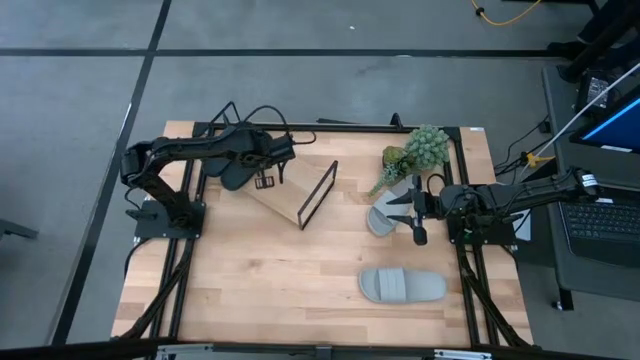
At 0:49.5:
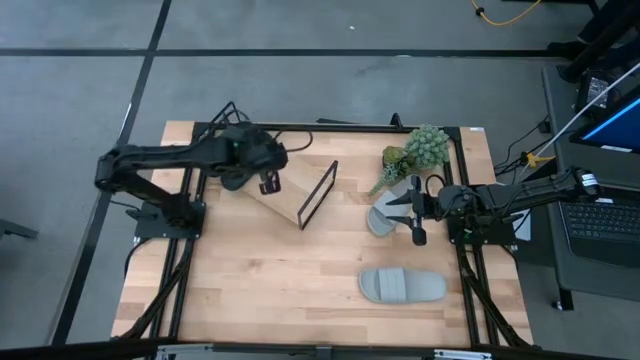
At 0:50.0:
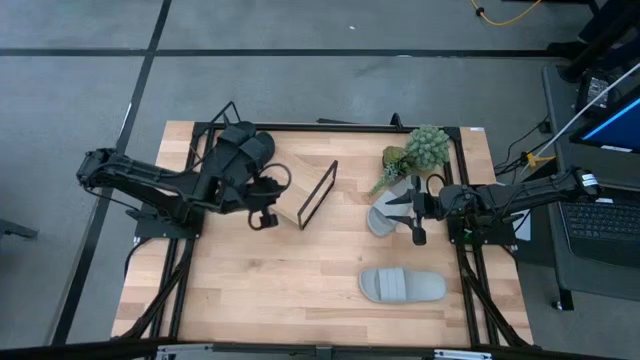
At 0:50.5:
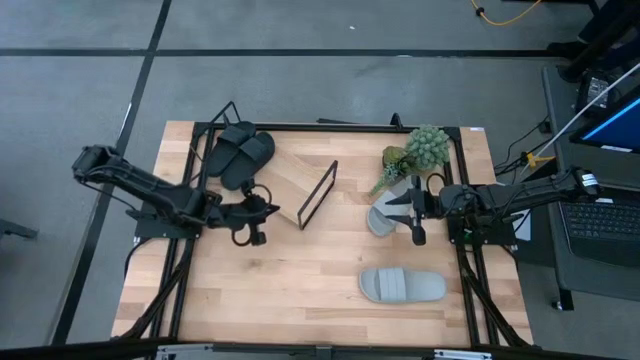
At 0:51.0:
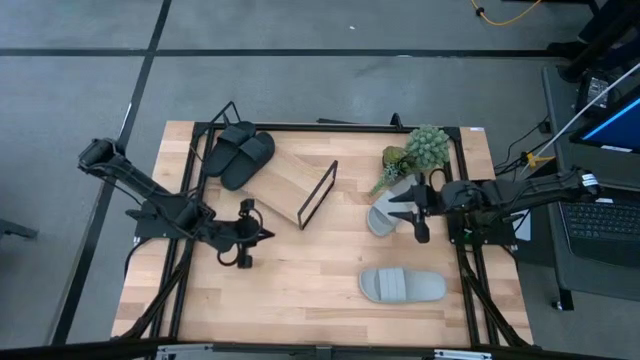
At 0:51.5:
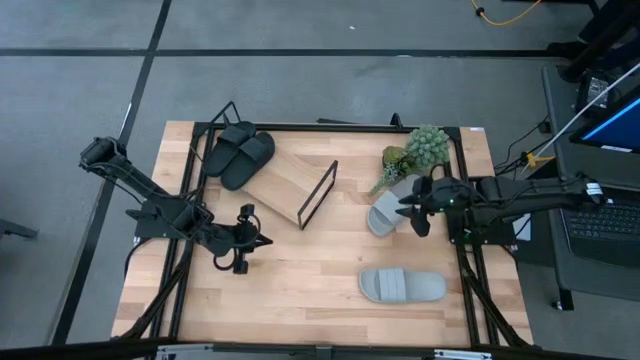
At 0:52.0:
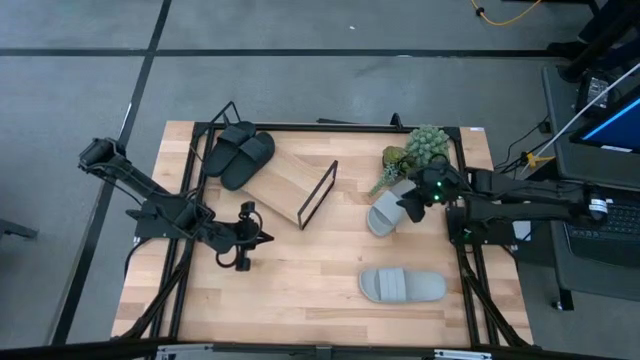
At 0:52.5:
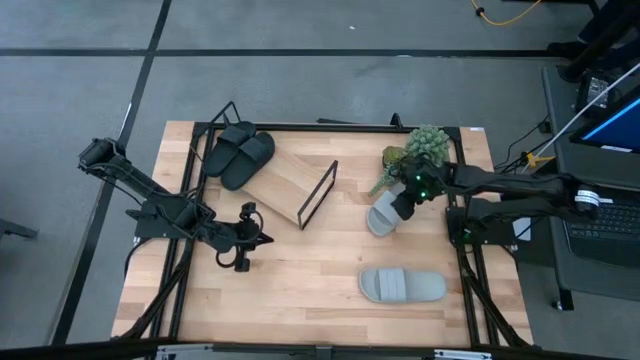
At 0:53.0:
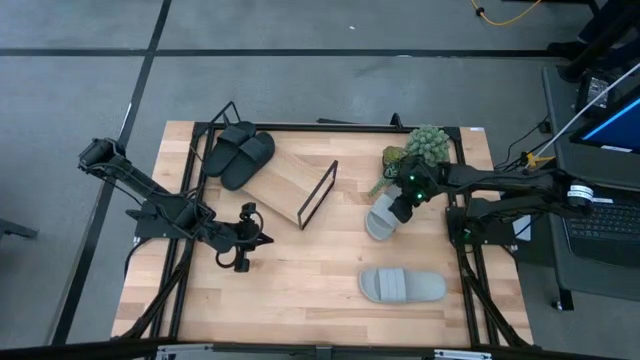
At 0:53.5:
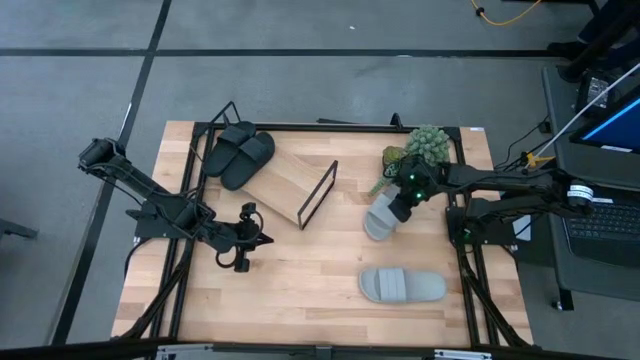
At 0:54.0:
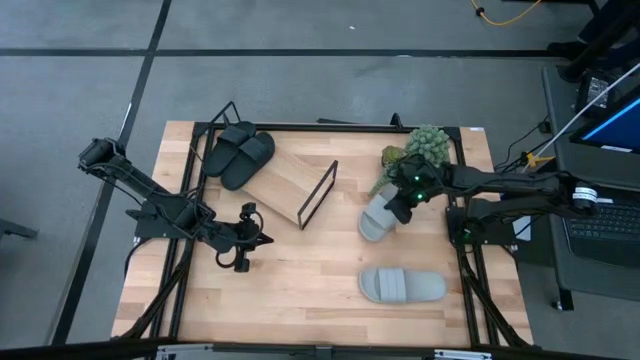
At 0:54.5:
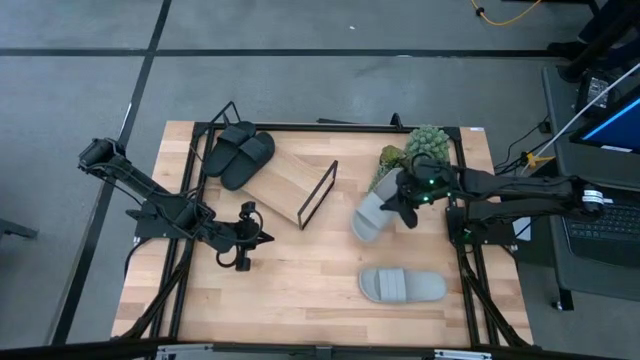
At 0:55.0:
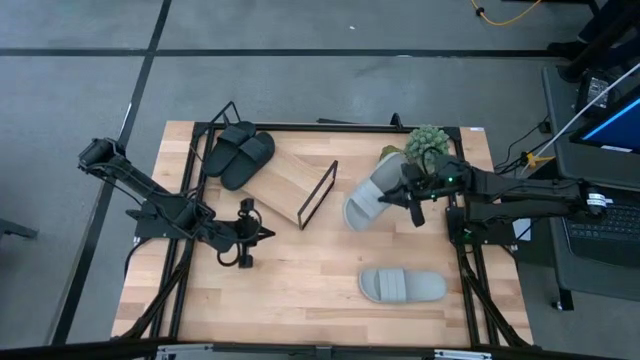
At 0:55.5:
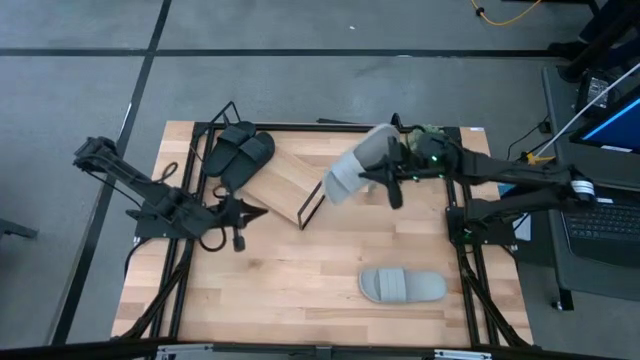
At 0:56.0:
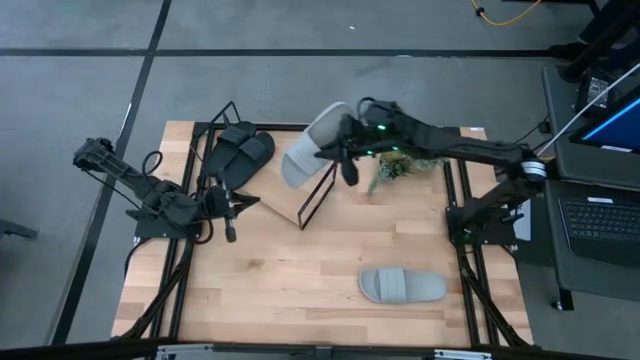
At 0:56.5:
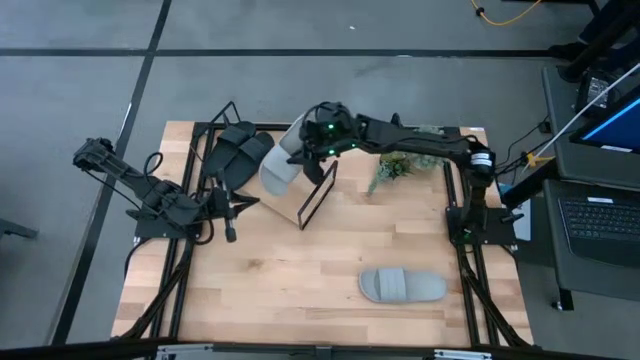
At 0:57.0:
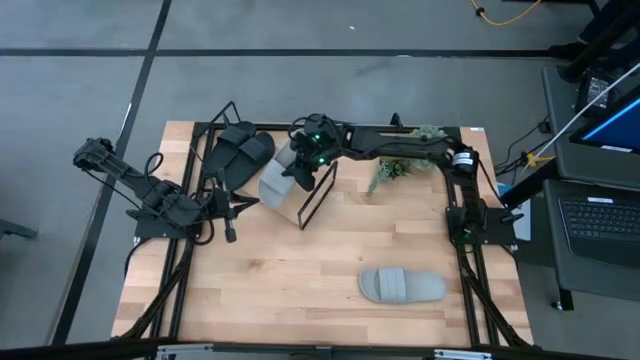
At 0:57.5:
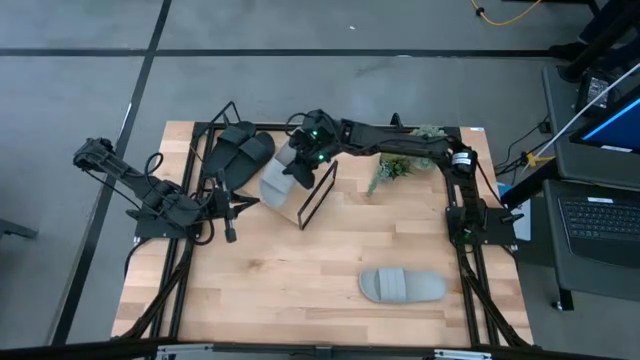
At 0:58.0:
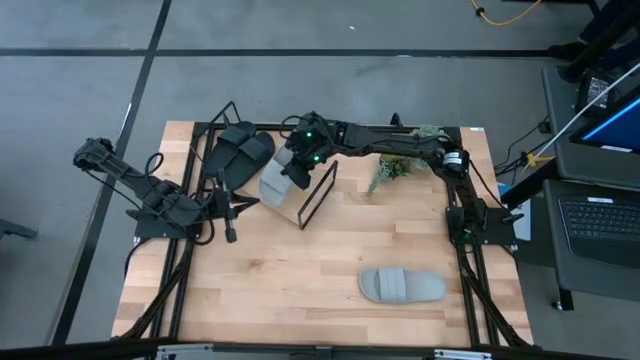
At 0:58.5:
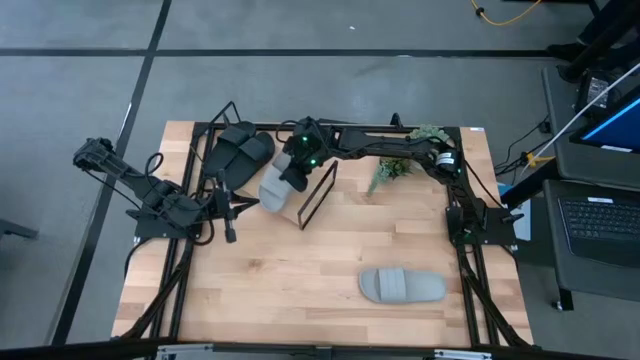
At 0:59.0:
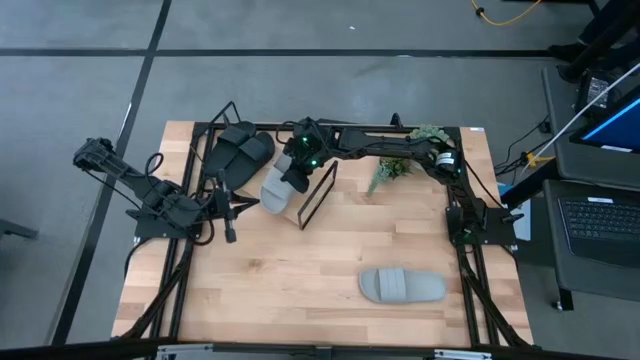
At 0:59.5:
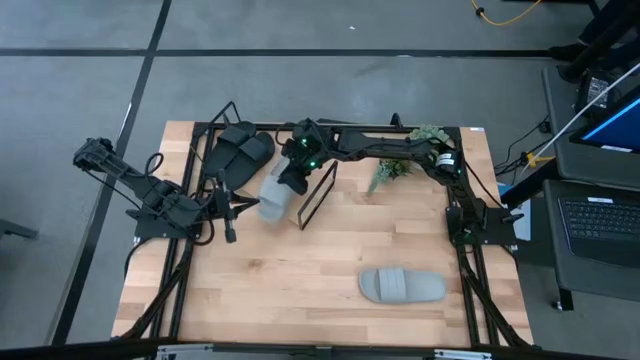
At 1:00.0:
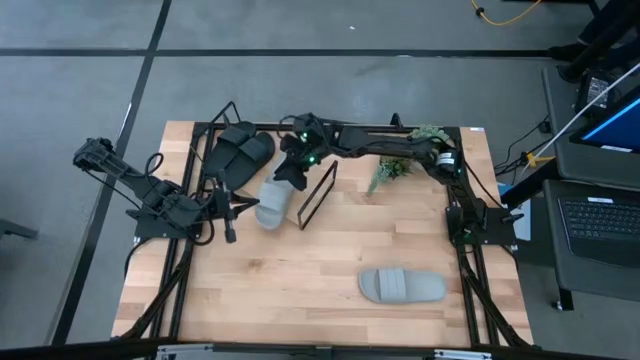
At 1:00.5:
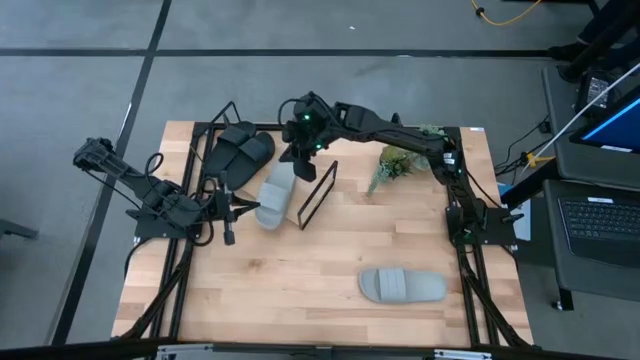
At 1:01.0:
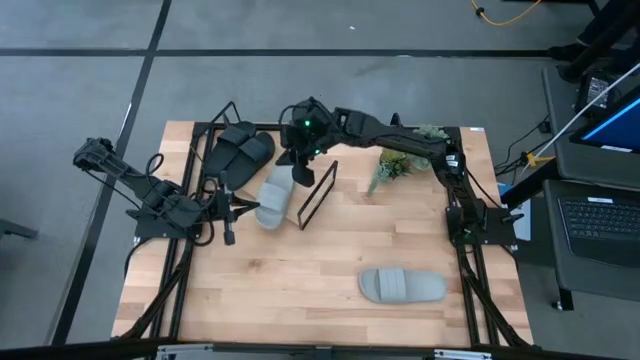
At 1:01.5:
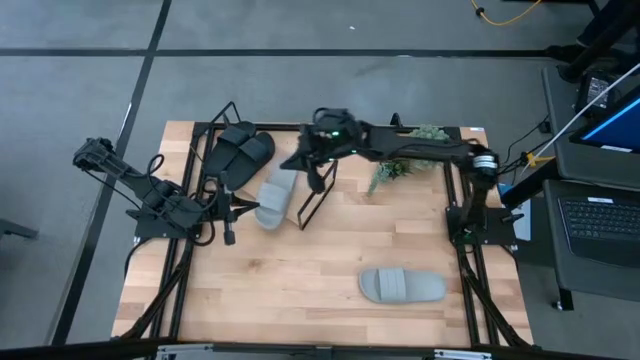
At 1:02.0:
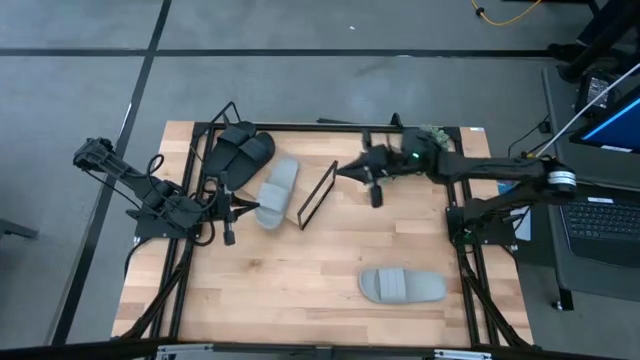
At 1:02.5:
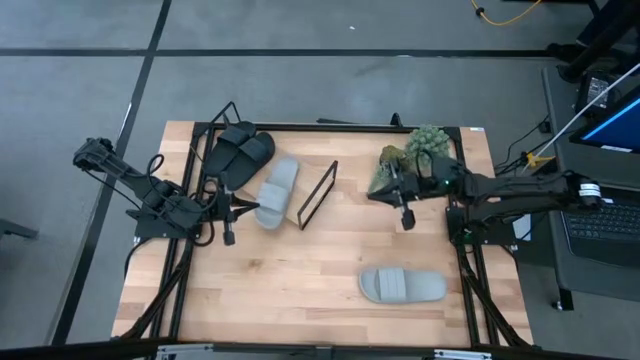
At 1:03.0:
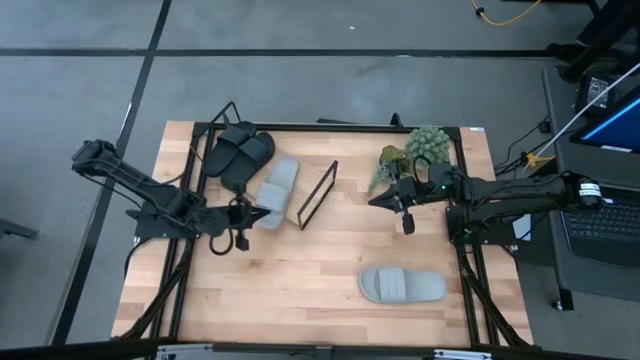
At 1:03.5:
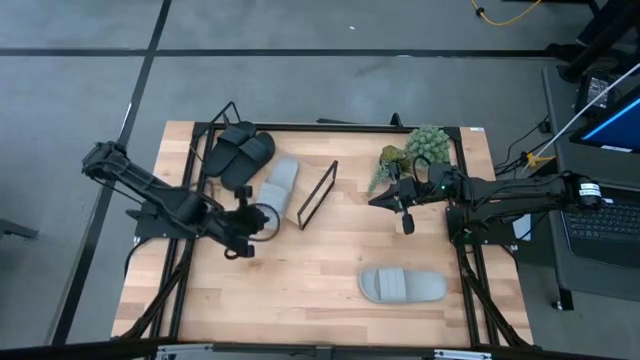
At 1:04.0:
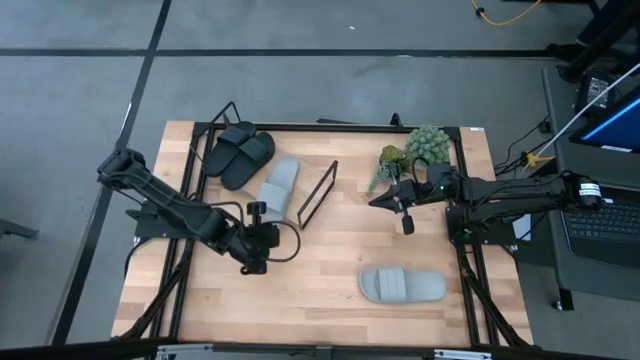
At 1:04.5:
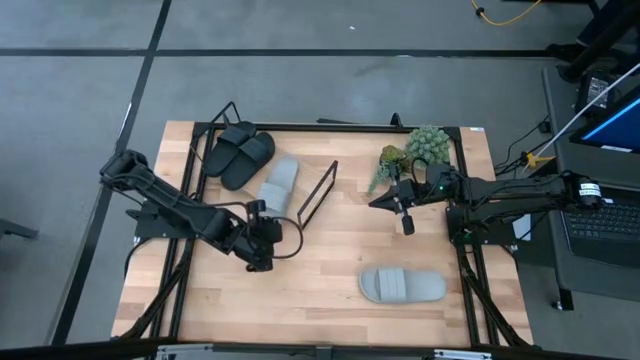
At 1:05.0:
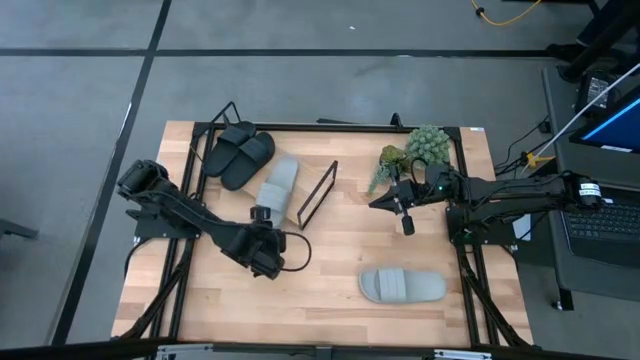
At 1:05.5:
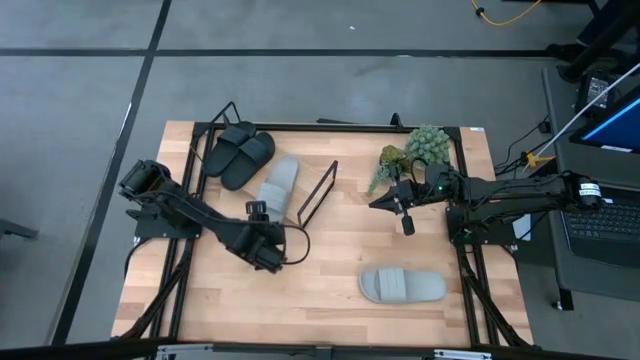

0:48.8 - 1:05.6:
Task: Pick and place slides into the shelf
Put the top gray slipper on the shelf

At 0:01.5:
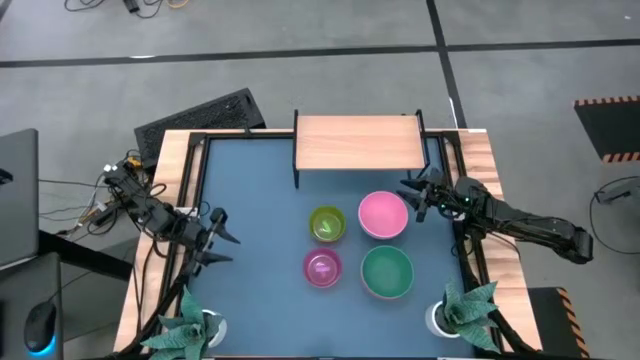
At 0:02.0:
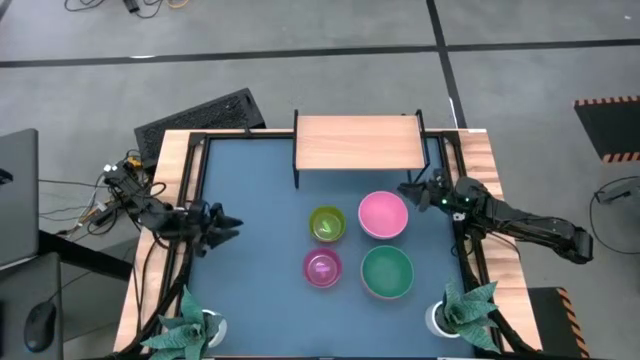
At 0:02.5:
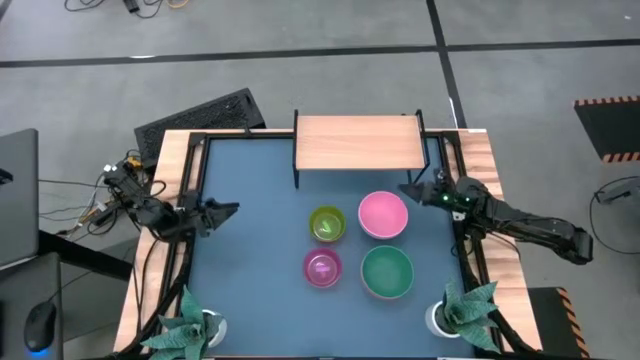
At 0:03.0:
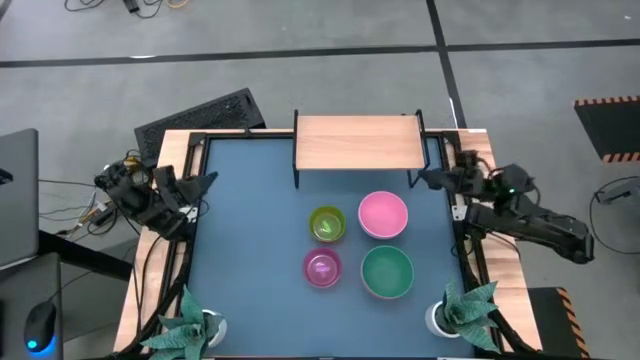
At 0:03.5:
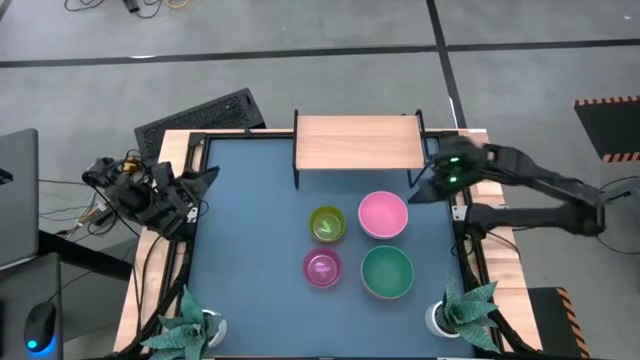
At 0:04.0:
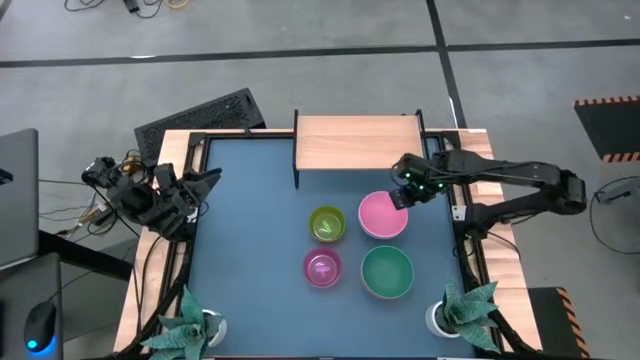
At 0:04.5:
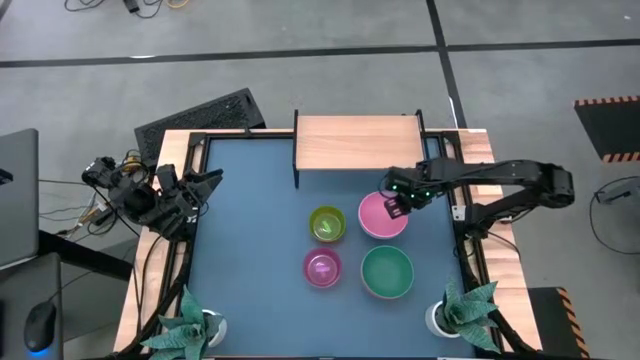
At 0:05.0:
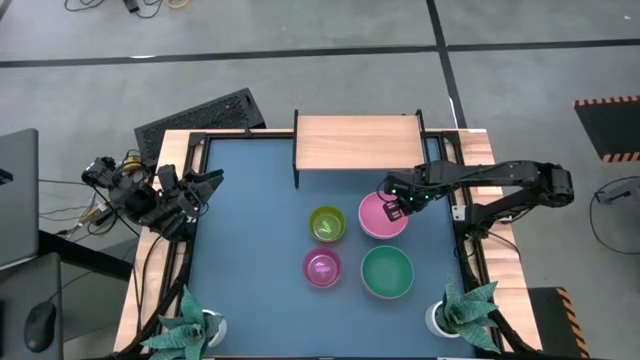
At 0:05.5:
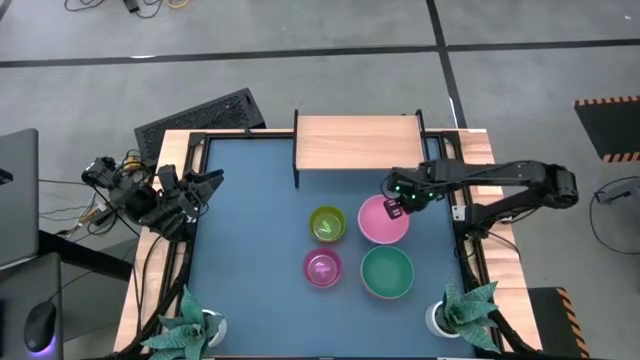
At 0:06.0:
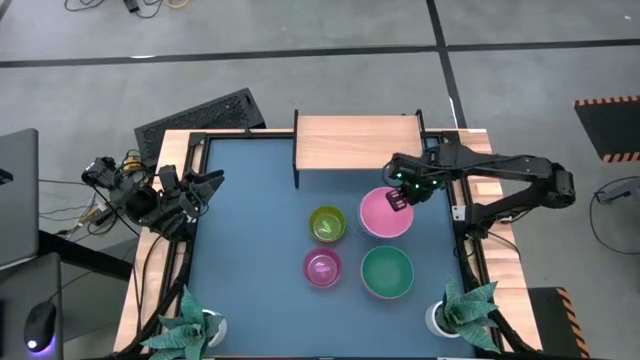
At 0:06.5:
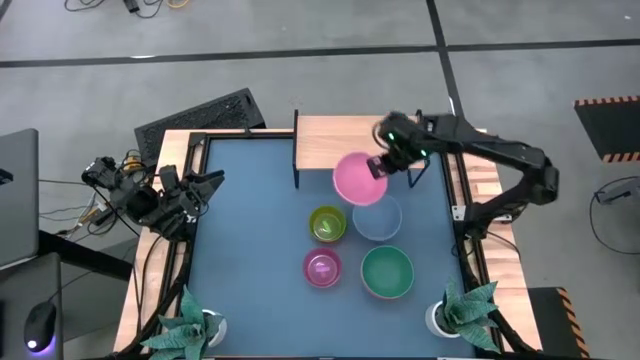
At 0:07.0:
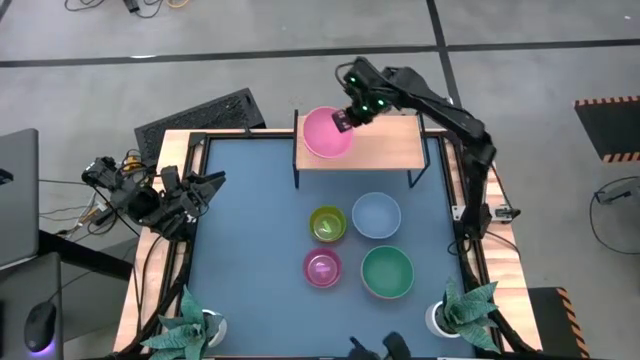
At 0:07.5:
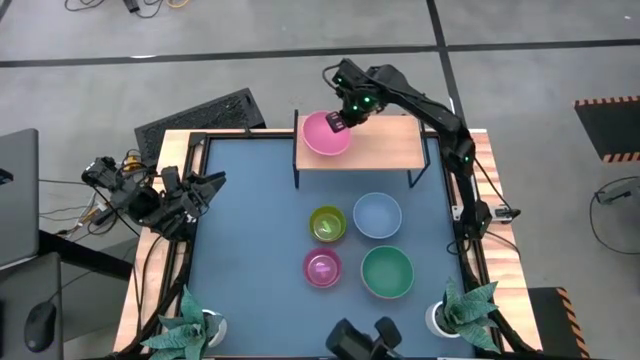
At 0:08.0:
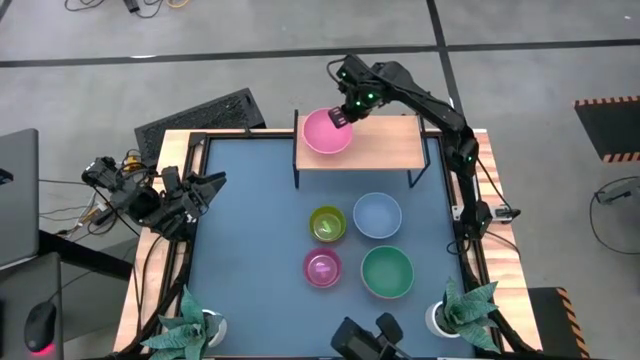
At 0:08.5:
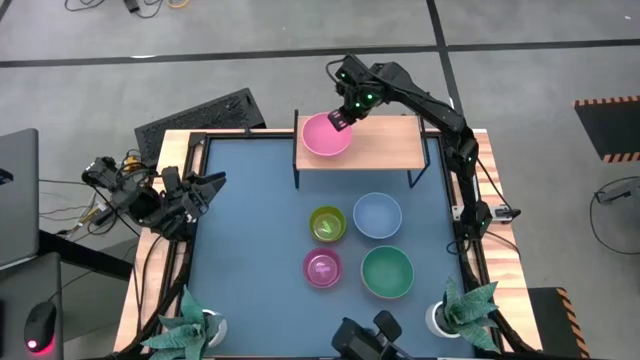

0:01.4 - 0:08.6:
Task: Place and stack bowls onto a shelf
Put the large pink bowl on the shelf
